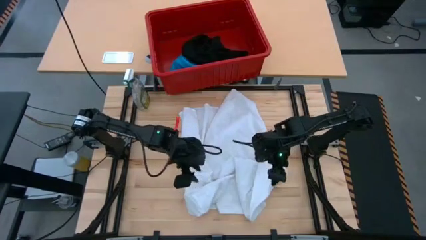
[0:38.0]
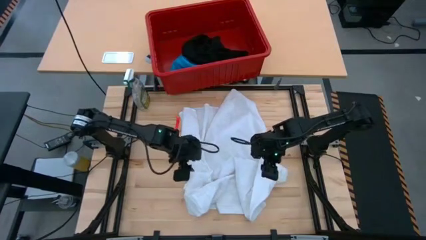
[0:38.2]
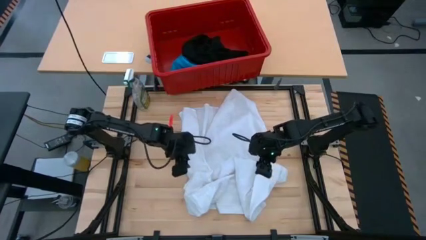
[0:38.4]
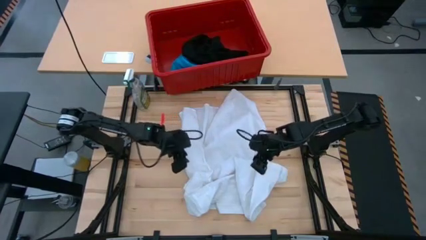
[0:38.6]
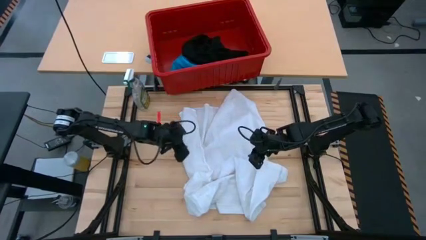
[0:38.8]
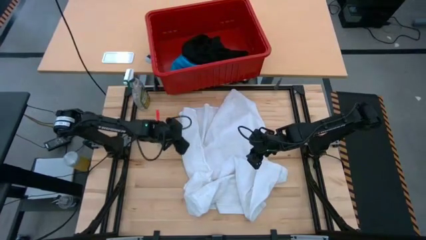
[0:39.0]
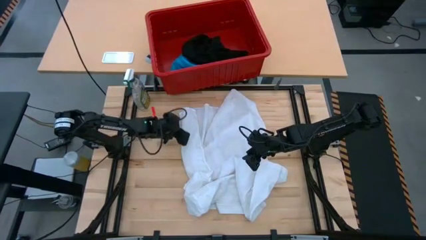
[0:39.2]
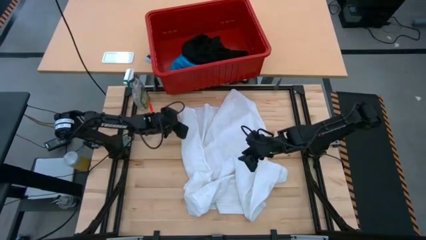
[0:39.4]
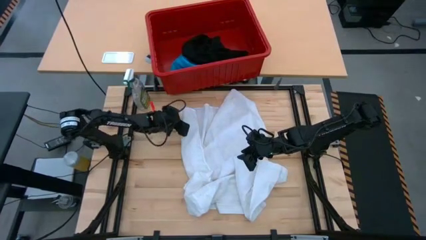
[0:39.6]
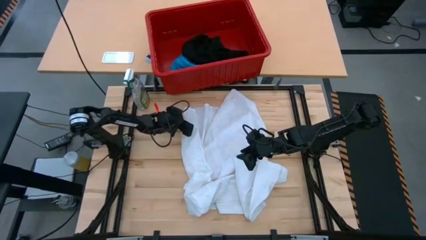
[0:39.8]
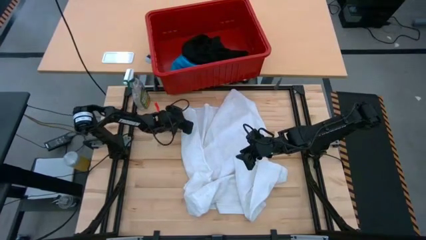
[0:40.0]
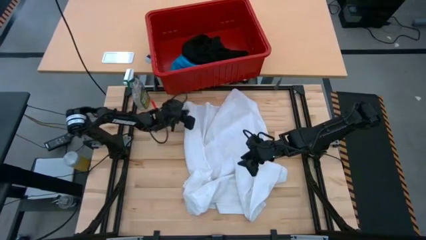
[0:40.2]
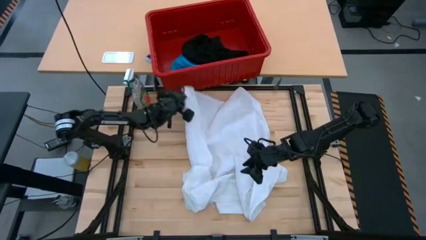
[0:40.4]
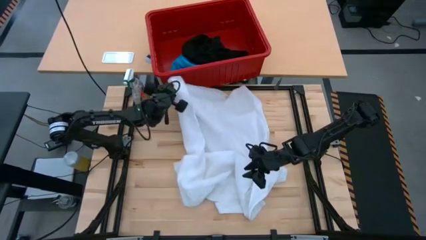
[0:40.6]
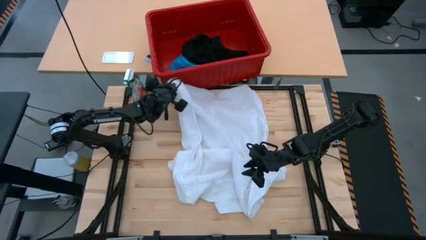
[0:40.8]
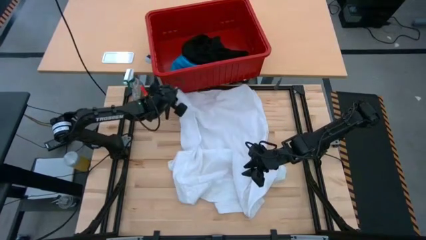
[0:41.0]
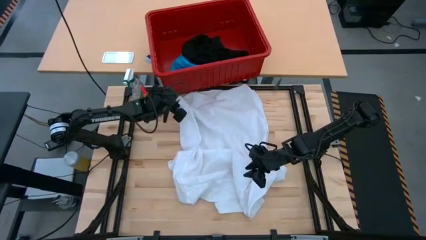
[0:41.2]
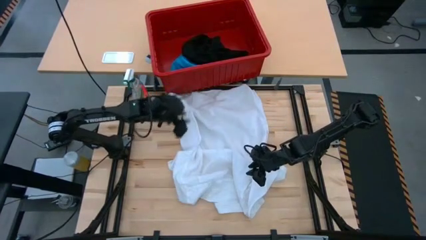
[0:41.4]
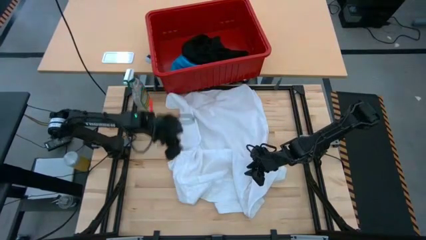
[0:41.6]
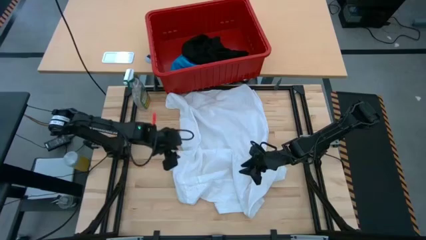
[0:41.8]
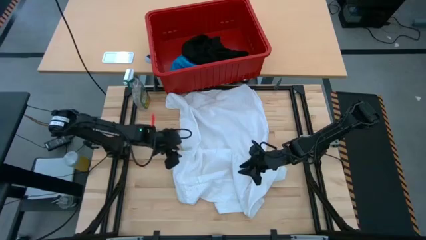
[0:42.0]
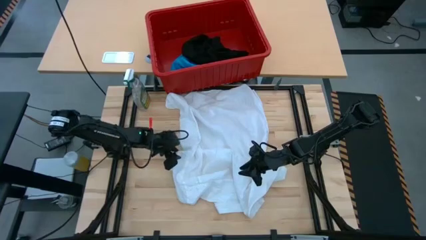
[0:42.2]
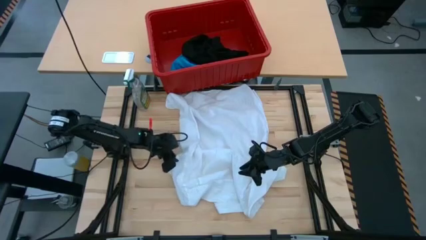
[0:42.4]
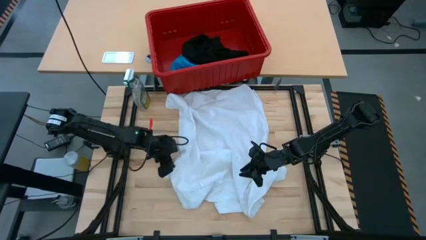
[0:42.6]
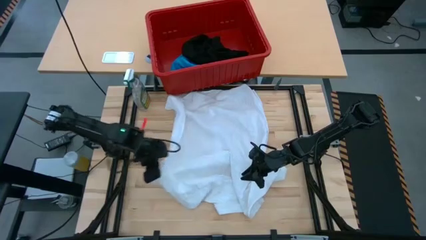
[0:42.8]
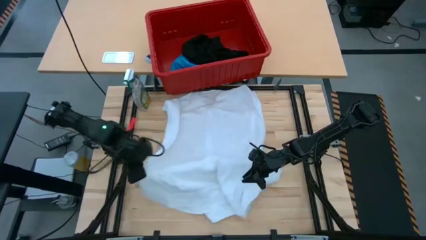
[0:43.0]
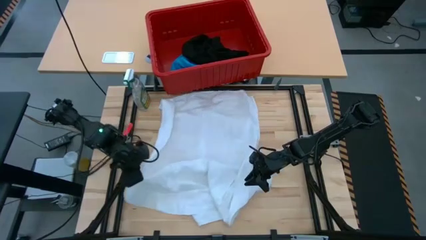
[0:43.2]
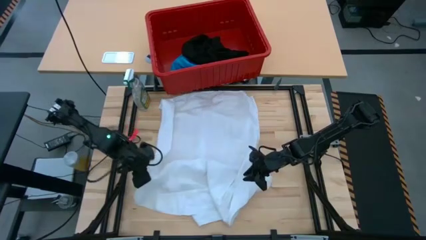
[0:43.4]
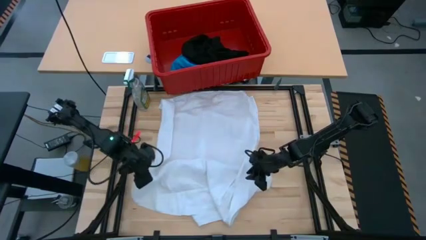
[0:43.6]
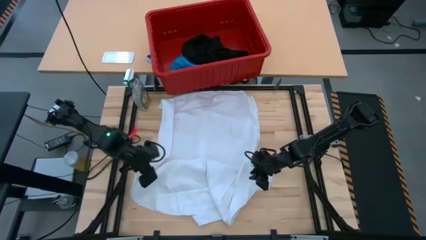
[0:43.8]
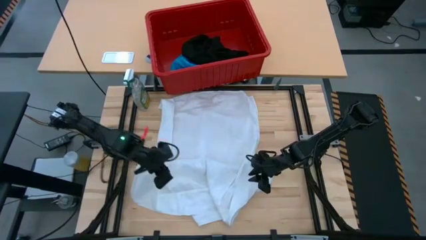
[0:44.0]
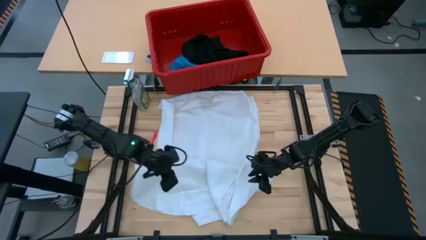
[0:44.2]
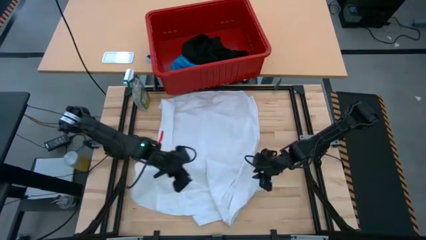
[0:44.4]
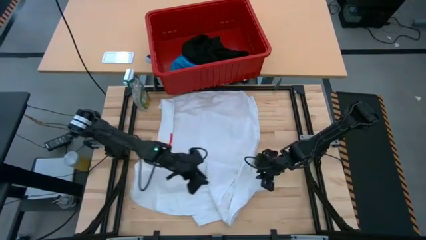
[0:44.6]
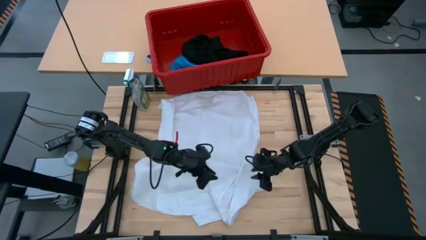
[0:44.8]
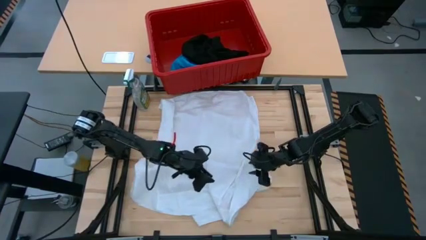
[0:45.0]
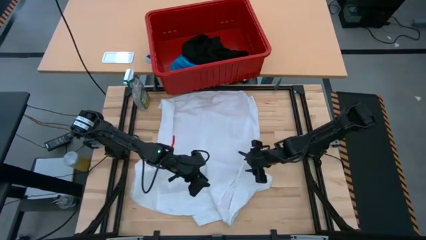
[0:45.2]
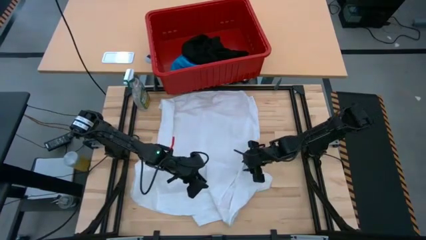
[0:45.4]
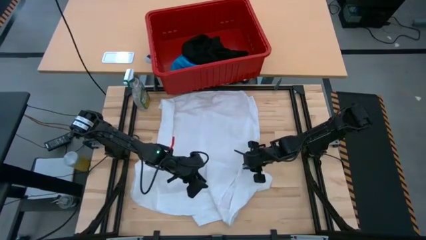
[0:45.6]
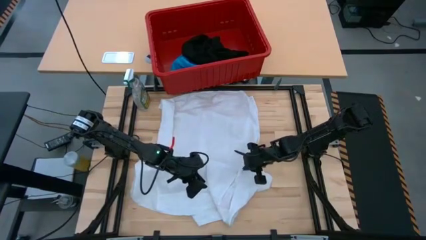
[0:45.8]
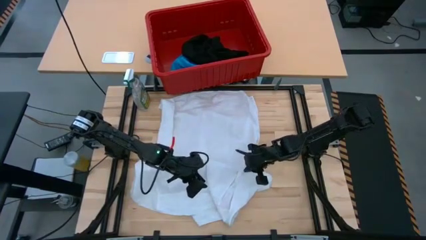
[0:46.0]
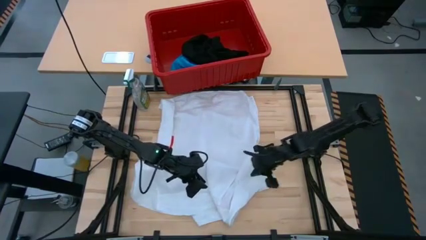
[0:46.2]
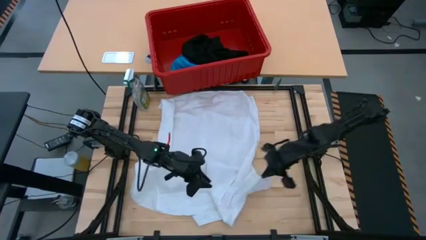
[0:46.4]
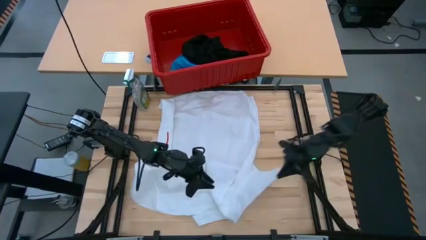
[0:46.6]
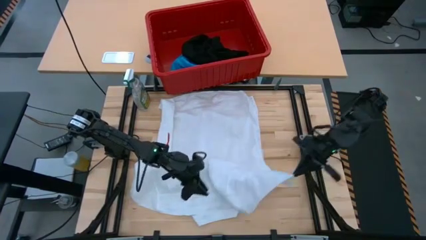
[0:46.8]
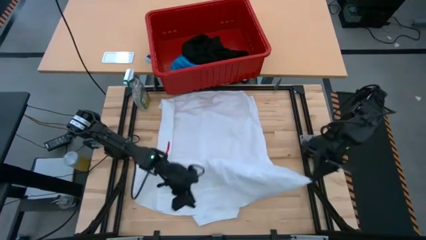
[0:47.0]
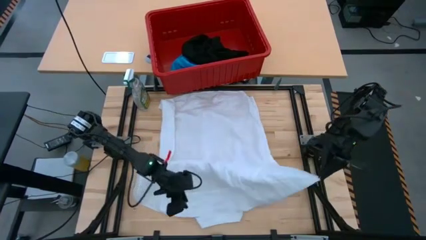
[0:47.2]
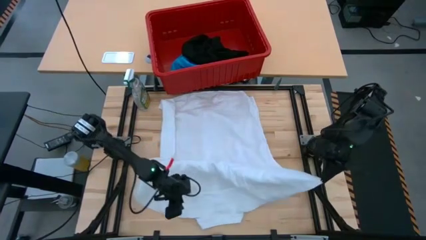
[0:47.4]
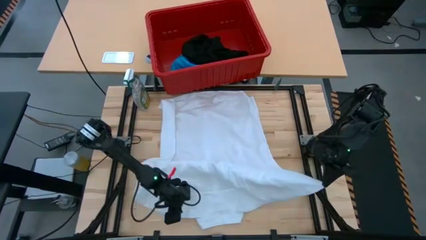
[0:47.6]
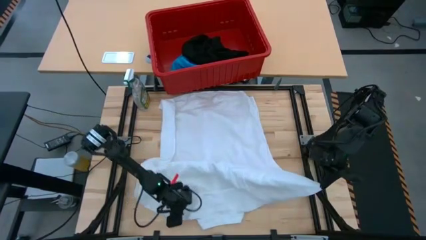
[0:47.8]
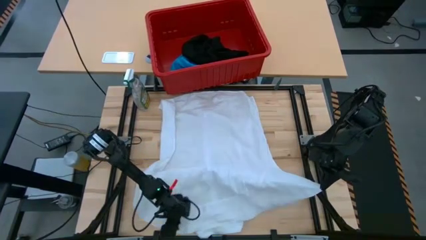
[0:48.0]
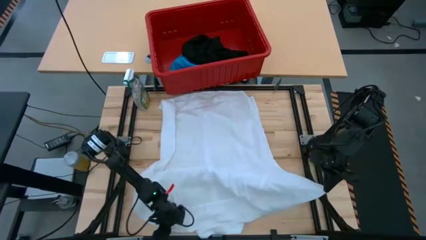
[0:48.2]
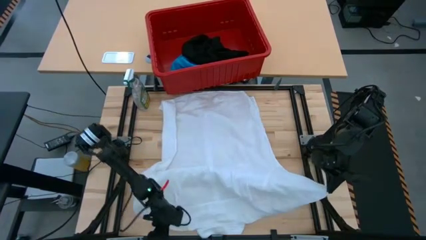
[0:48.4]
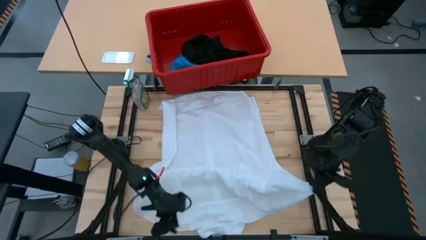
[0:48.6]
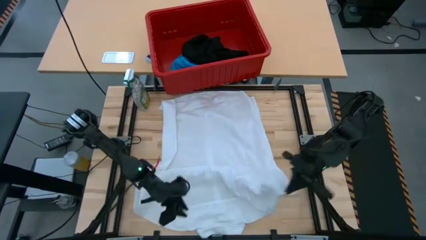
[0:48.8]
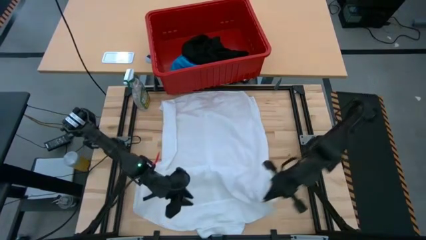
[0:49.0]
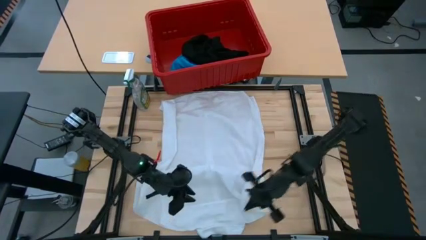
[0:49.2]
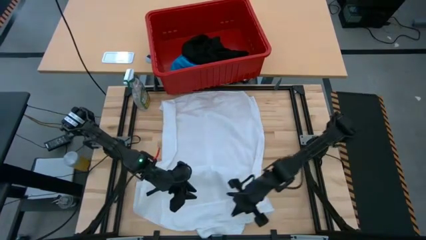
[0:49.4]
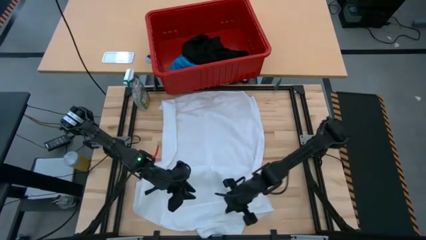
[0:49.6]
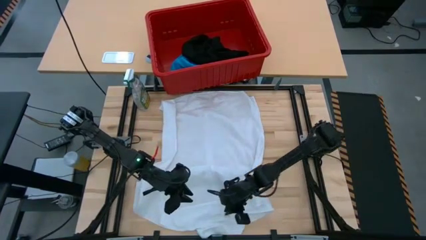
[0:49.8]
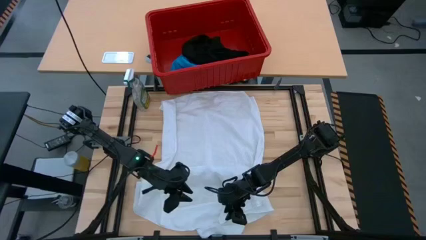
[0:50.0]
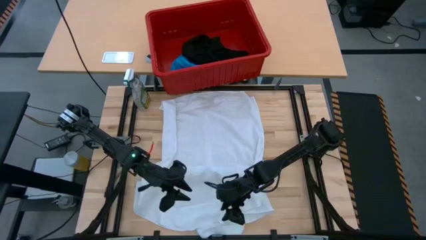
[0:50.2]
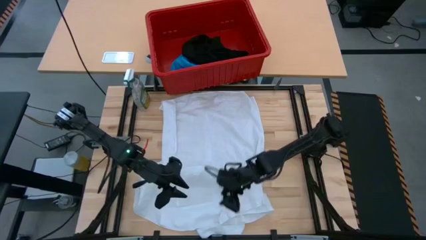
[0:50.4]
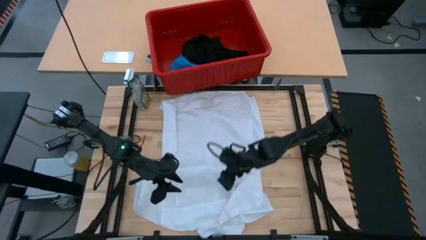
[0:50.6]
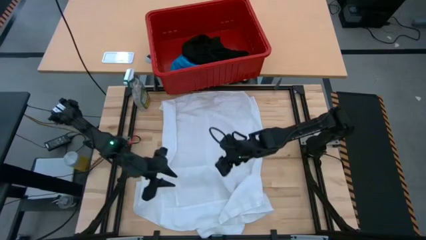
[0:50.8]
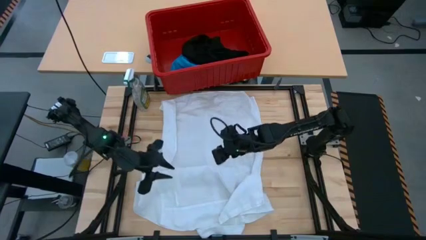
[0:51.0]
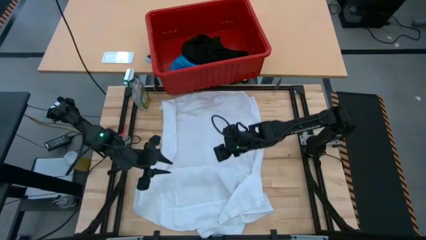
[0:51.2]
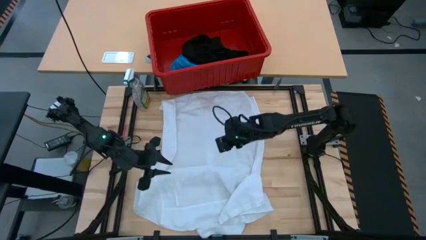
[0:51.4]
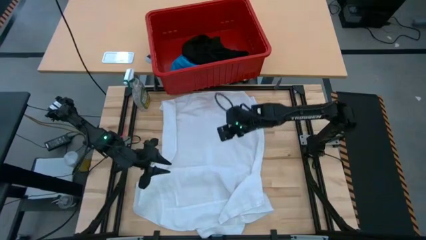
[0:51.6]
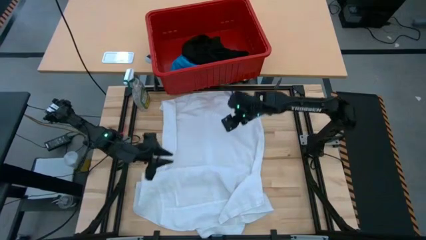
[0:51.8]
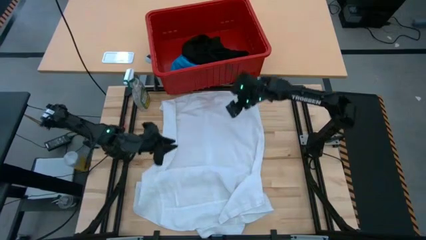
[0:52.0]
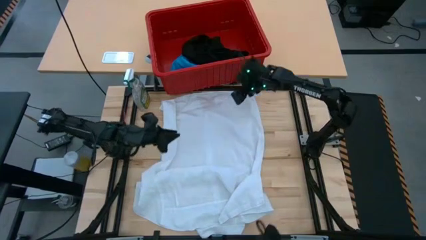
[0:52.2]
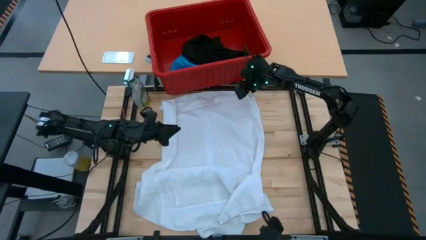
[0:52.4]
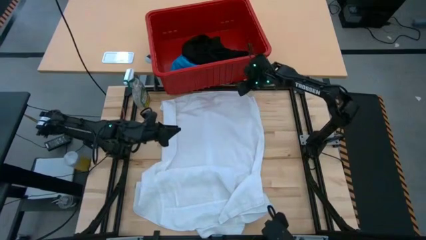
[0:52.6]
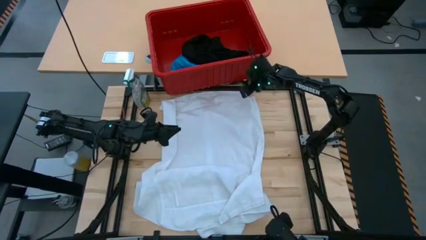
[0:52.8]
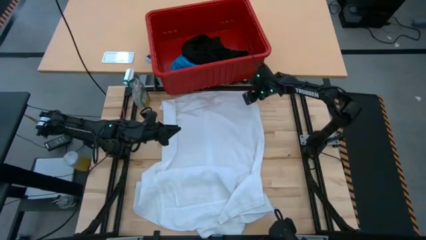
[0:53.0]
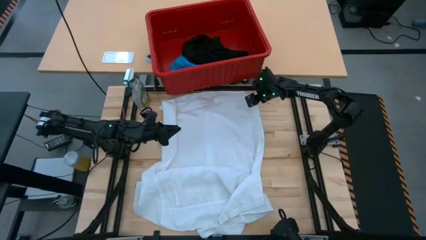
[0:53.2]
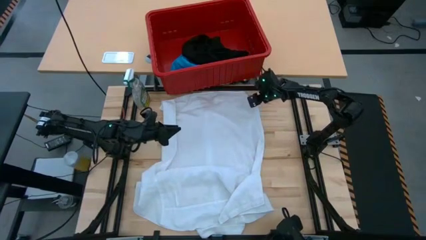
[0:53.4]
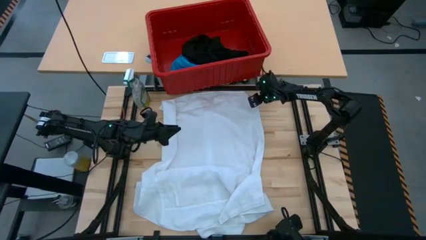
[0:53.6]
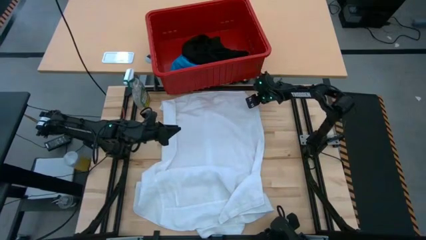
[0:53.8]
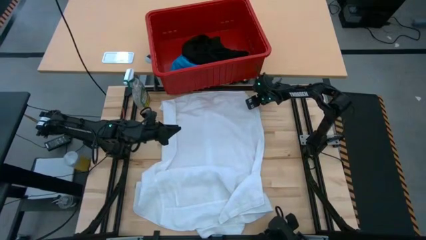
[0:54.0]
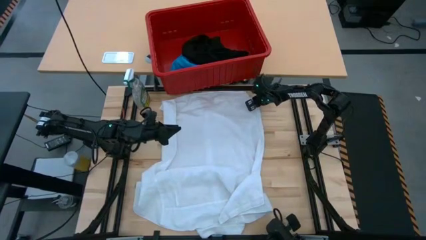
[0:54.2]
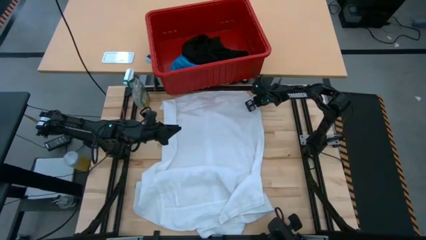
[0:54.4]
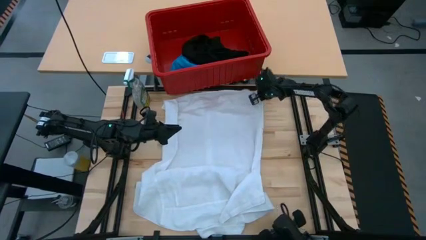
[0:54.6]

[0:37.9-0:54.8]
Task: Fold laundry
Fold the white polo shirt
